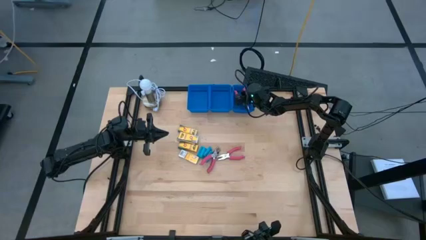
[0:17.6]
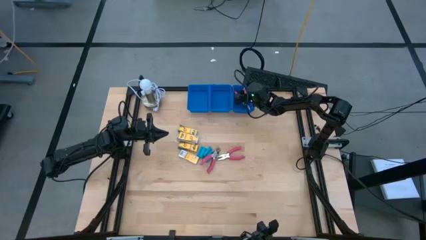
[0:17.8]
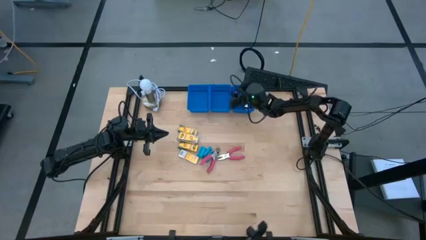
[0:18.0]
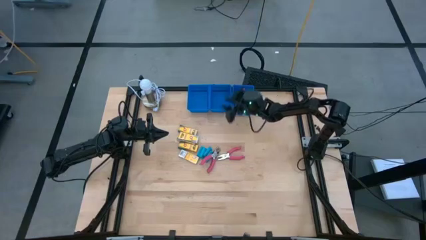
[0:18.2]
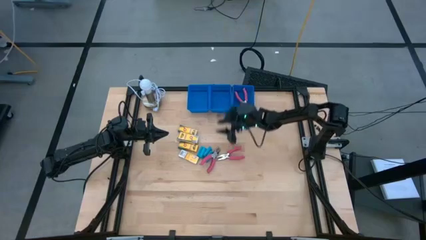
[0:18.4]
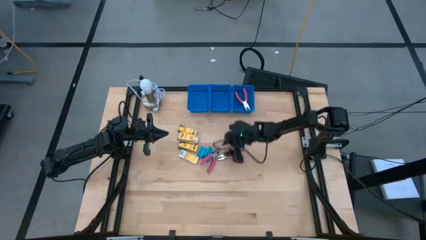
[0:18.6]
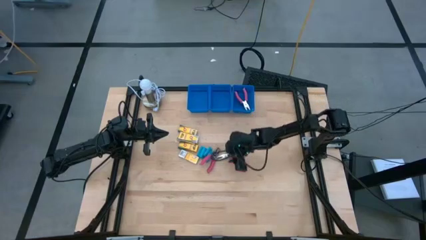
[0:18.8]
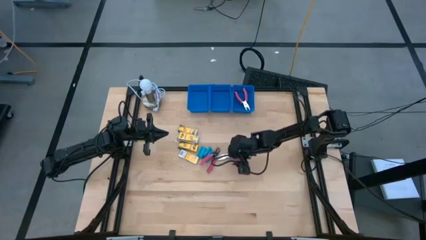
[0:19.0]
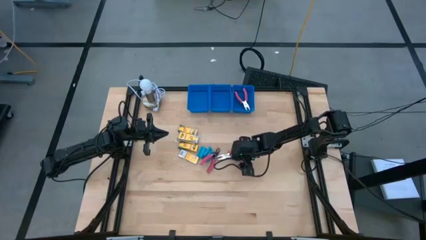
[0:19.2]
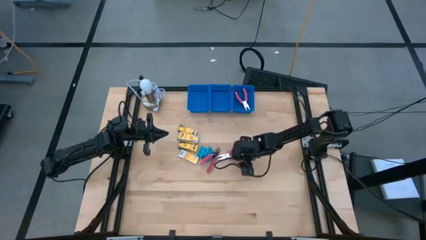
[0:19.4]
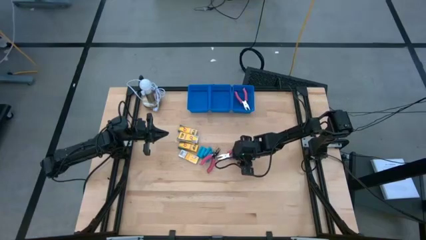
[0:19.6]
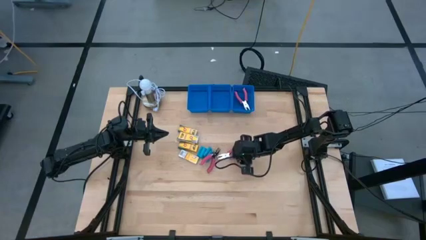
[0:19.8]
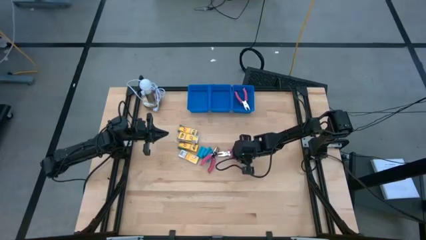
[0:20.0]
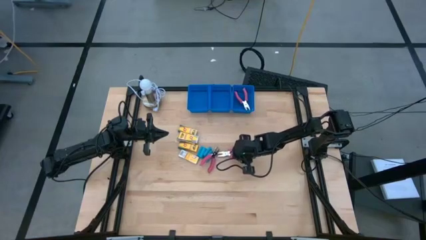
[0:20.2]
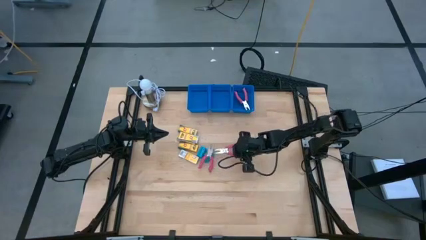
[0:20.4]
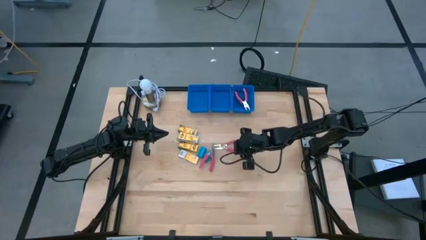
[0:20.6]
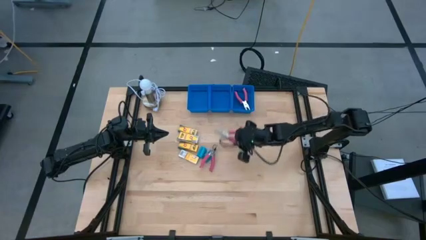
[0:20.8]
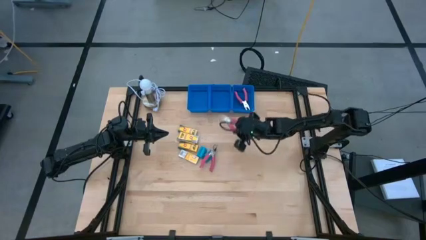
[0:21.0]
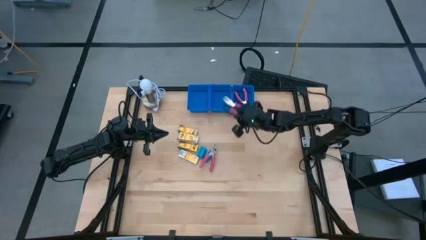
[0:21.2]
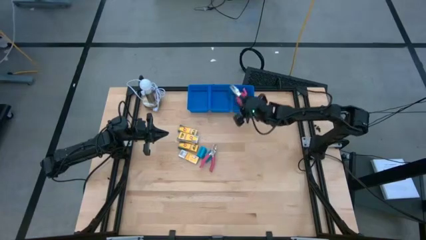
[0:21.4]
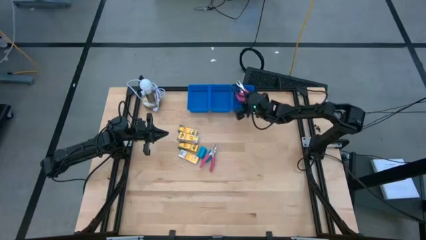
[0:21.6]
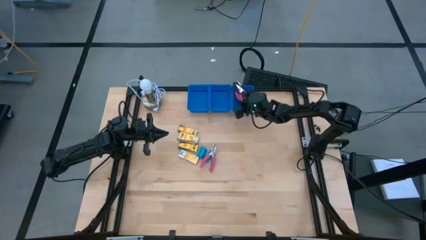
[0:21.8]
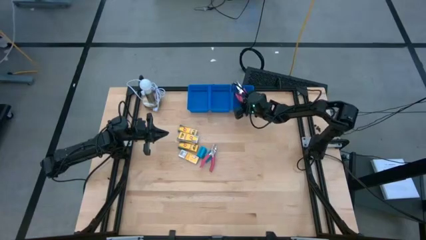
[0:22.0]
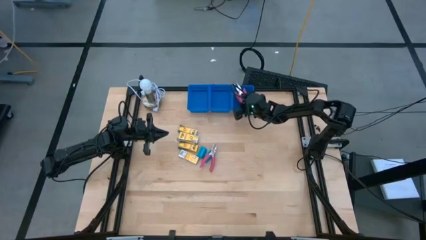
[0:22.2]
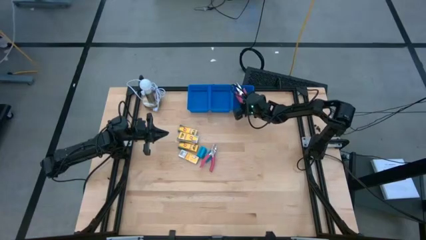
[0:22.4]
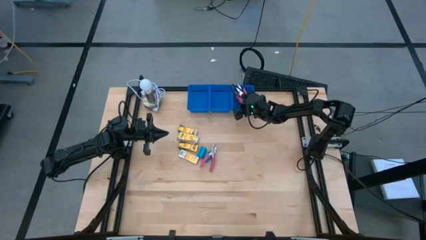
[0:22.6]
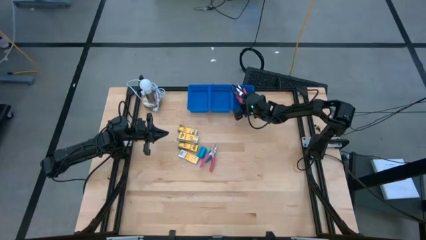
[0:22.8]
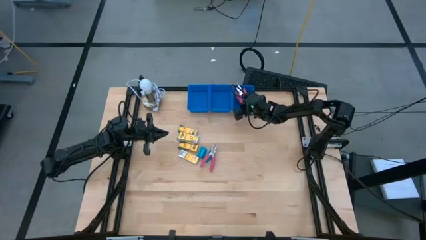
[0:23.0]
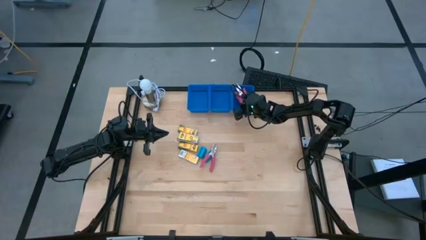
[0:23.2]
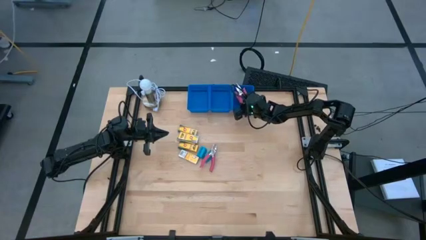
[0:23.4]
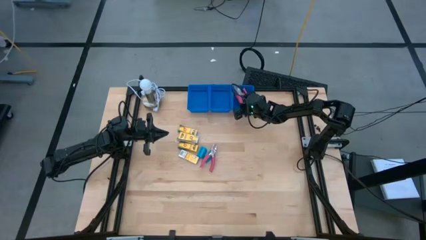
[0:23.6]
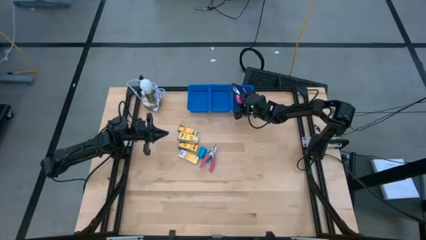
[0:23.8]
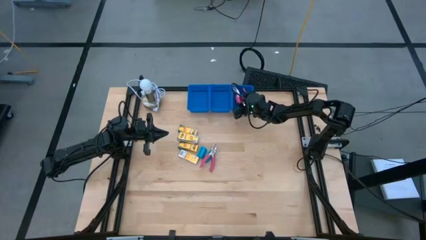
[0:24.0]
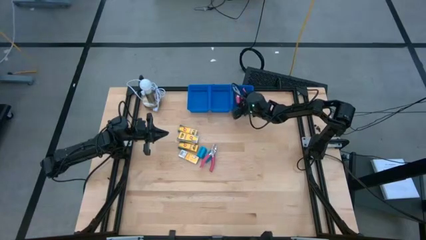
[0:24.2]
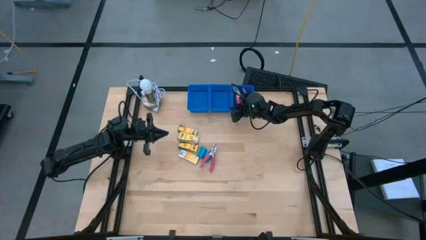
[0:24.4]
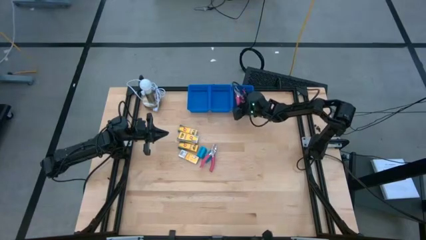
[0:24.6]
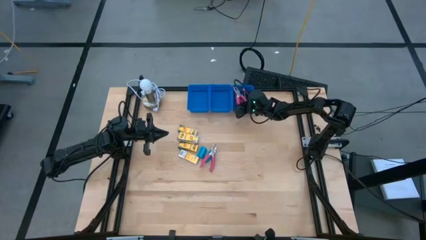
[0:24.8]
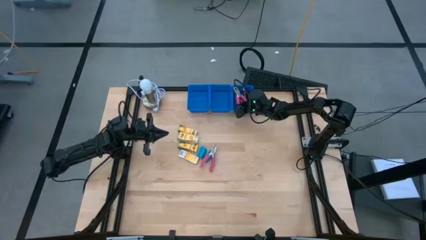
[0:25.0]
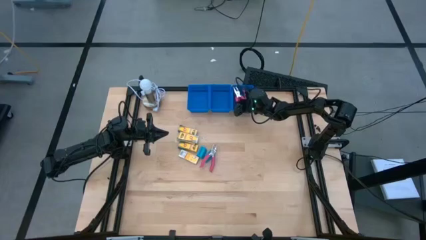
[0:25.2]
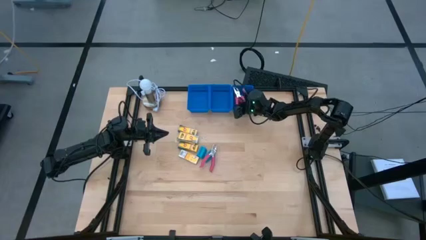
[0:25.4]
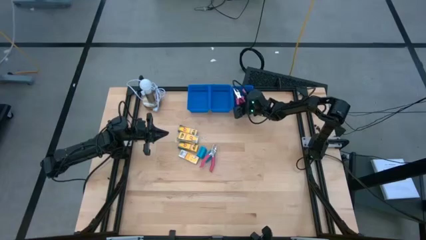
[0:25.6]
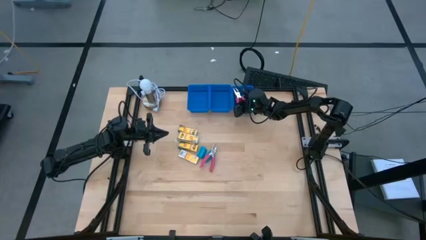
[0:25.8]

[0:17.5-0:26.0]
Task: Pick & Place School Supplies
Put the red ticket punch into the right blue bin

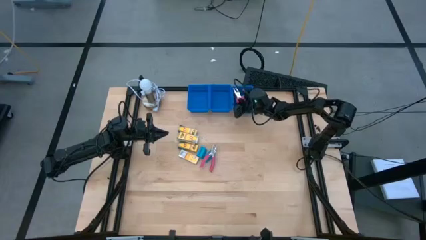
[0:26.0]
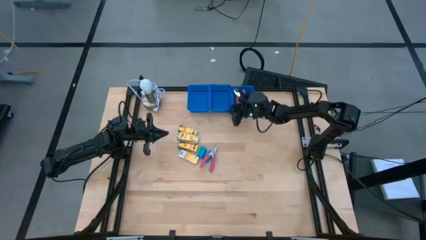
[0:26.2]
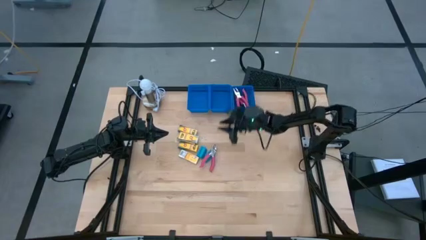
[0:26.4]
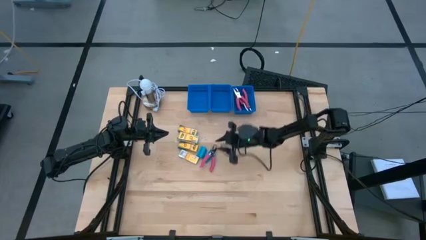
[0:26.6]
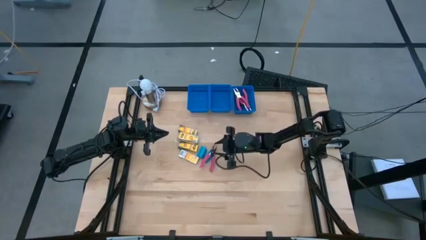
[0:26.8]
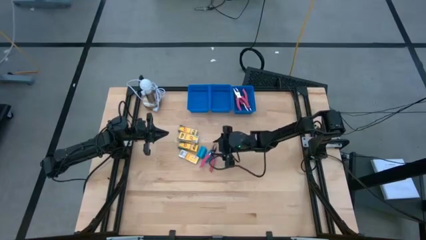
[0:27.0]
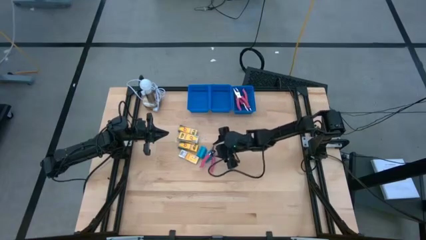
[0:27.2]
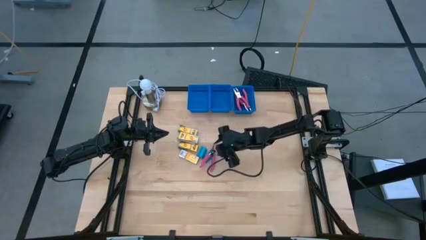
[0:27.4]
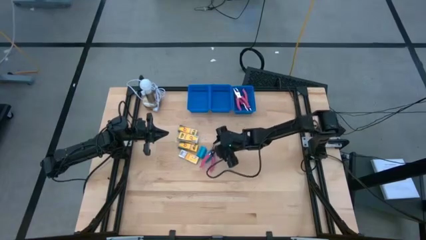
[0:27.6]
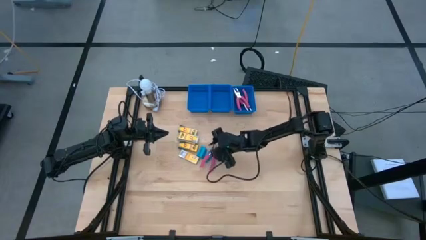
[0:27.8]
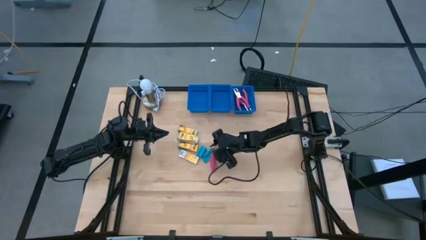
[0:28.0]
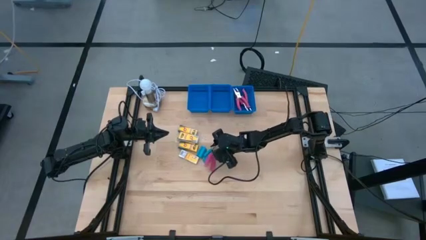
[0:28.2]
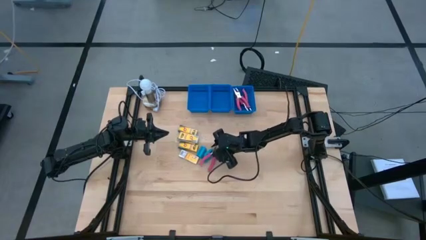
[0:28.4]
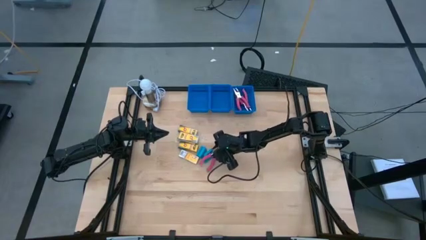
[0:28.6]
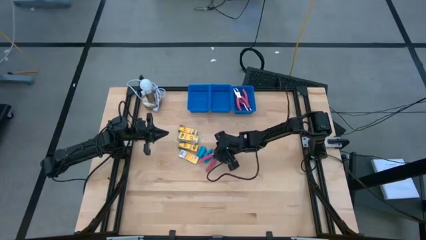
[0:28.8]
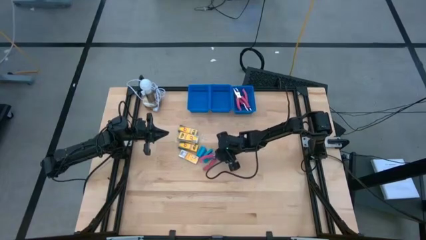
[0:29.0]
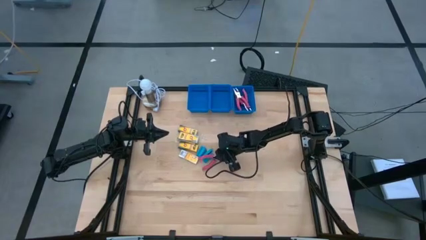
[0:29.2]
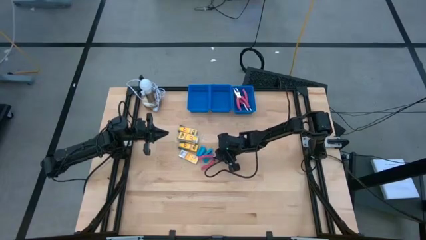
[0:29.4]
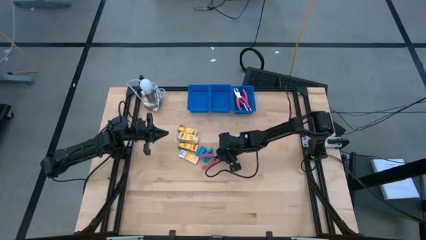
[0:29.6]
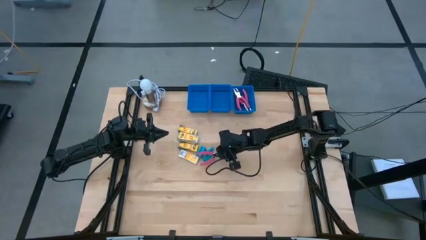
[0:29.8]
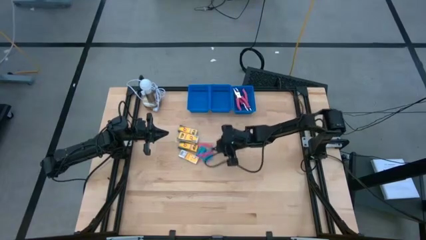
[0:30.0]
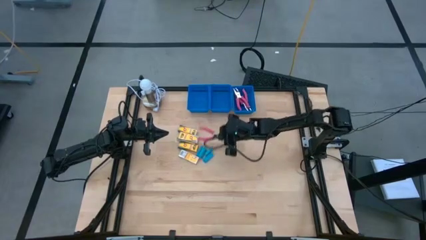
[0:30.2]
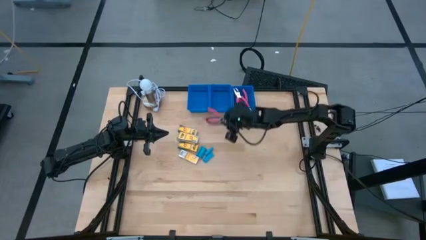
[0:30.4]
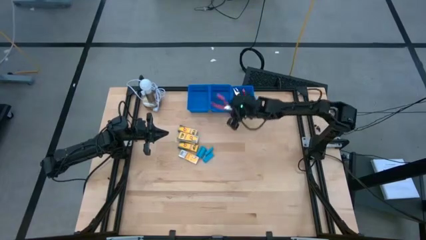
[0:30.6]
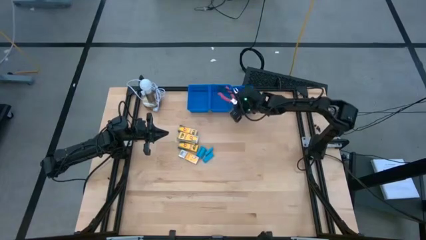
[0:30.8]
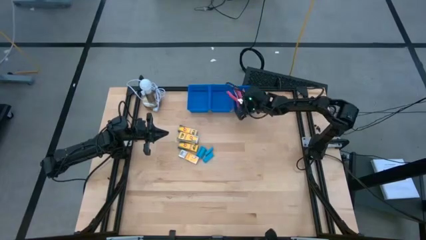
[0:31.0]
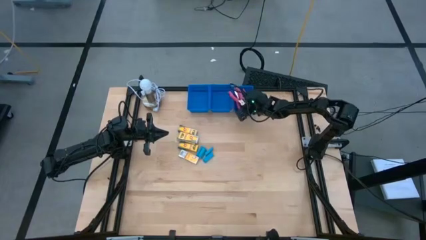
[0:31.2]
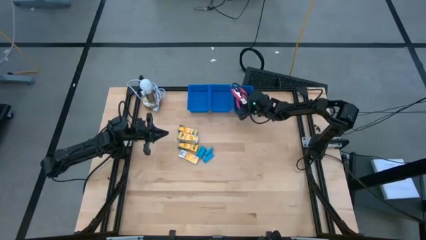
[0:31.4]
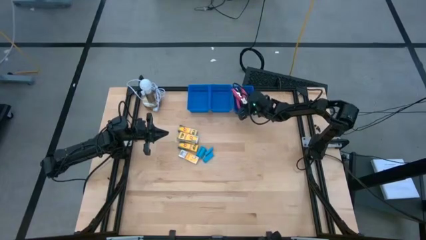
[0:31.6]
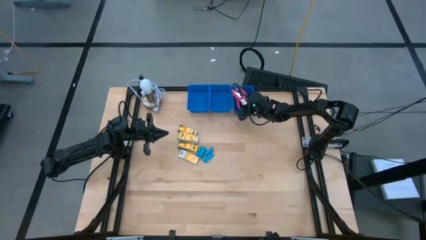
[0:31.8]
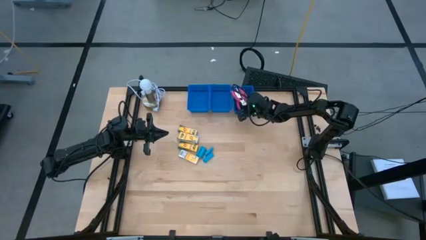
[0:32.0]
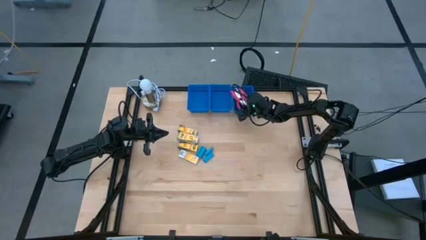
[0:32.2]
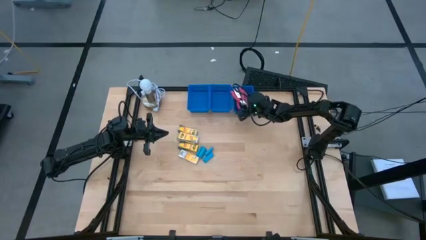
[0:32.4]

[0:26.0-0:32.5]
Put the red ticket punch into the right blue bin

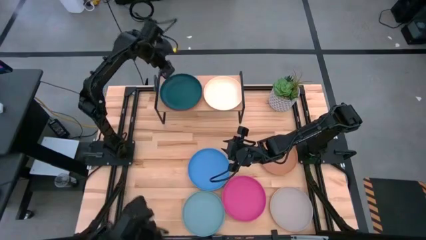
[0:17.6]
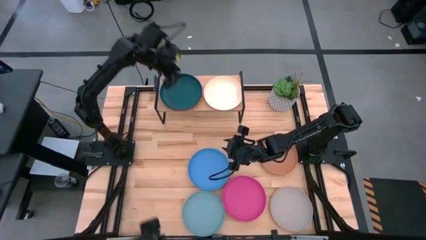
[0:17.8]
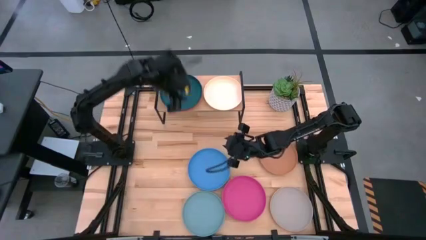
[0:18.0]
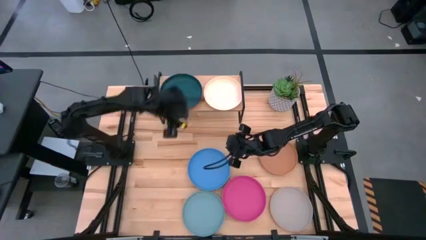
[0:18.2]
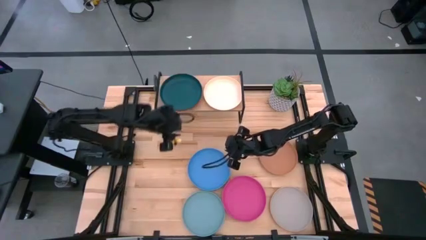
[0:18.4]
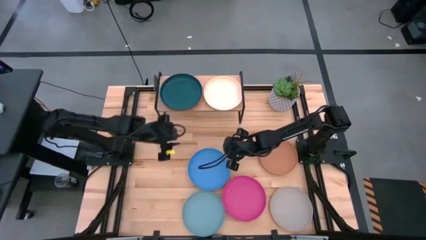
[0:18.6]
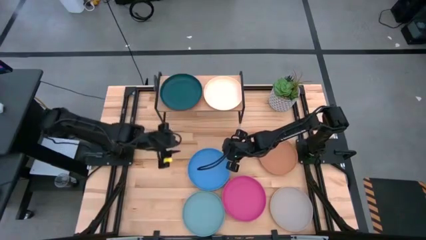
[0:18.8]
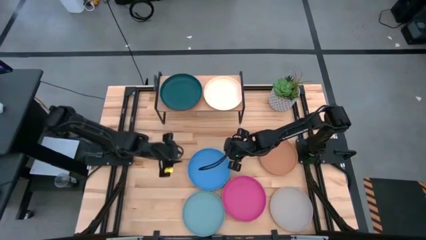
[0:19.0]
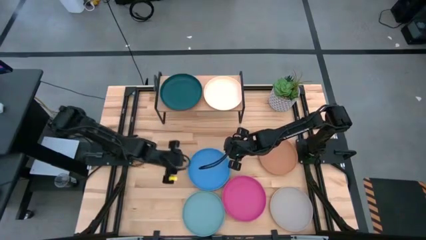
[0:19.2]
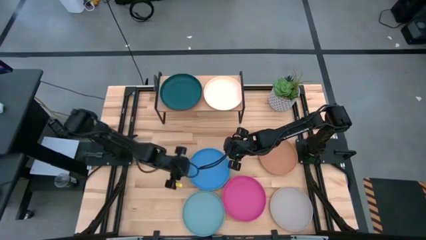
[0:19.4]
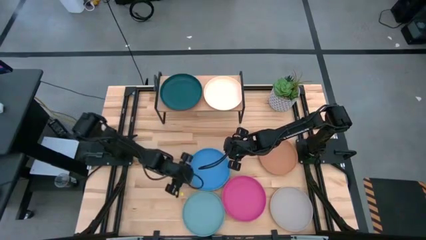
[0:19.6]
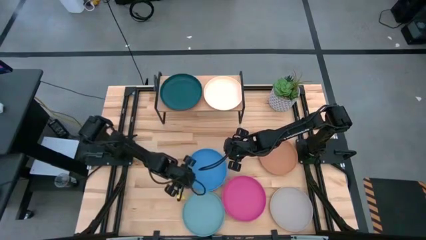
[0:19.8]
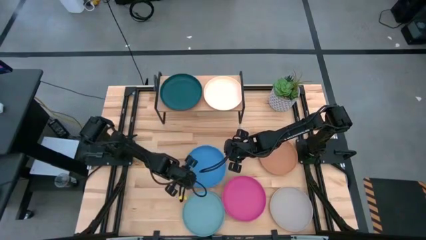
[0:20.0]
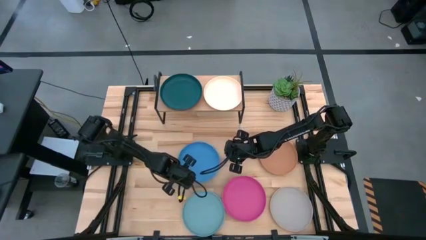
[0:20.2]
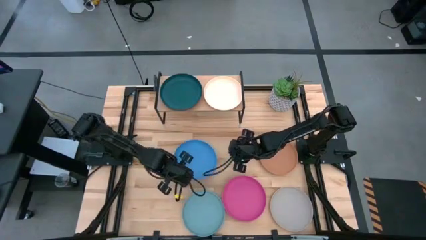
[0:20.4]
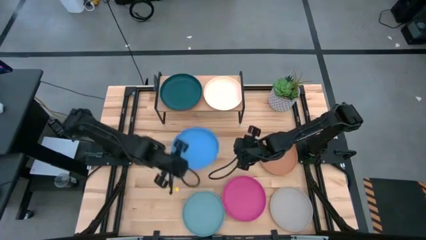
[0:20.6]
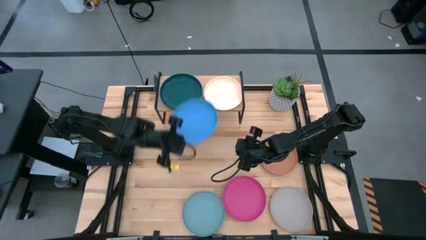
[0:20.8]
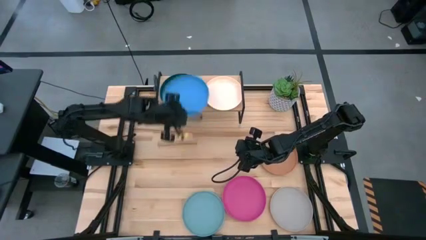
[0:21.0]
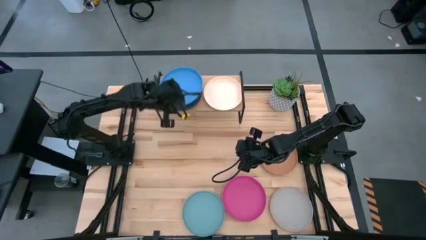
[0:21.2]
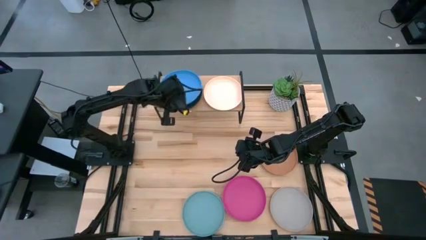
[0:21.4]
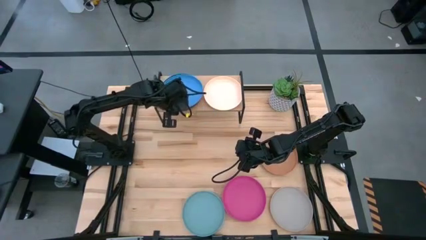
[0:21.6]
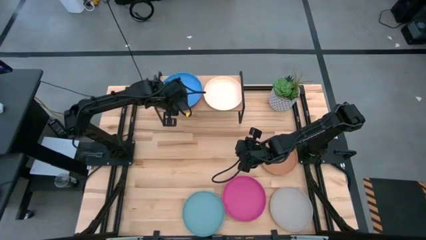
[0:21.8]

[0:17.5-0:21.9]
Task: Place and stack plates onto a shelf
Stack the blue plate on top of the green plate on the shelf
